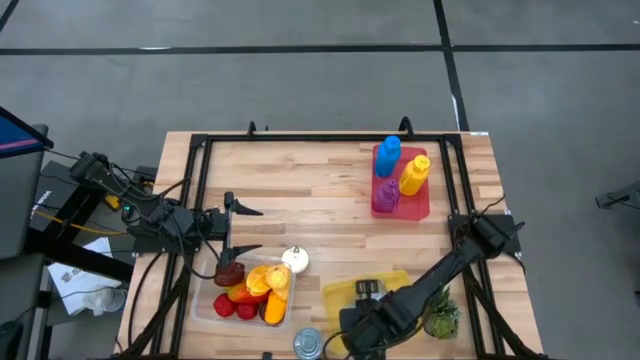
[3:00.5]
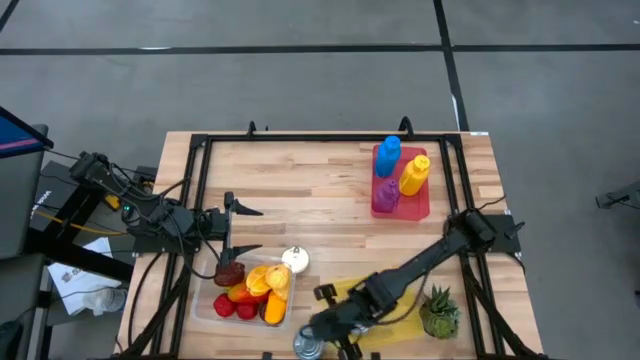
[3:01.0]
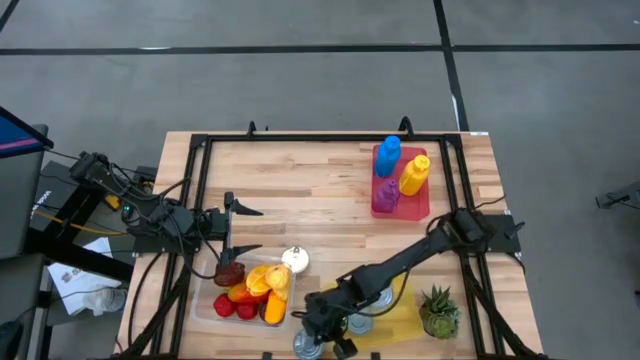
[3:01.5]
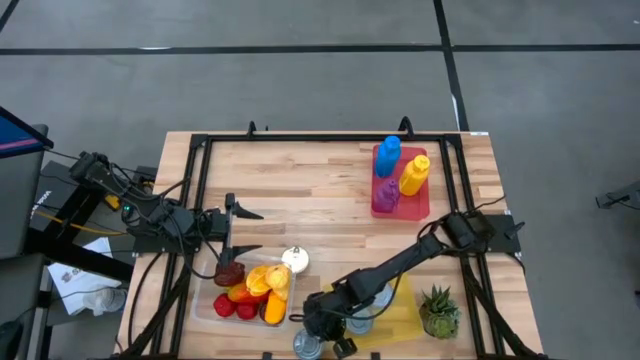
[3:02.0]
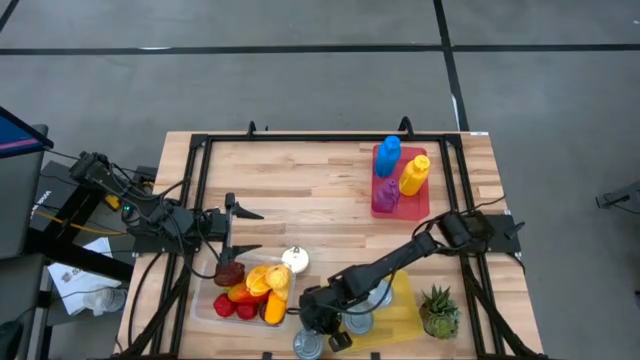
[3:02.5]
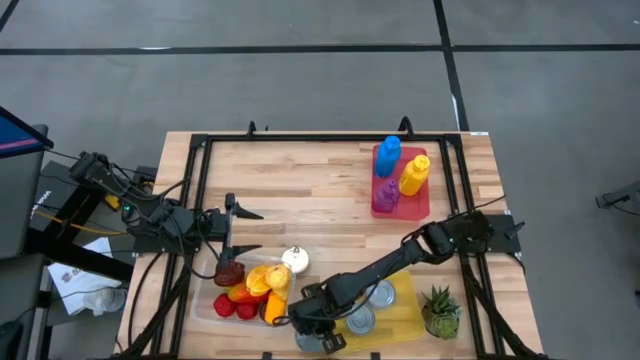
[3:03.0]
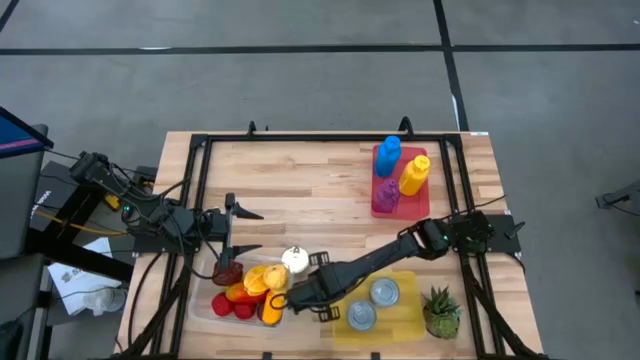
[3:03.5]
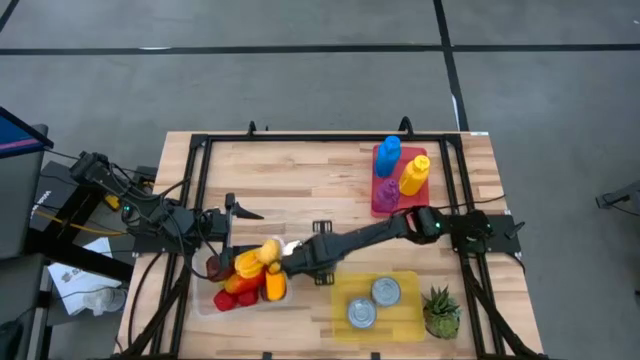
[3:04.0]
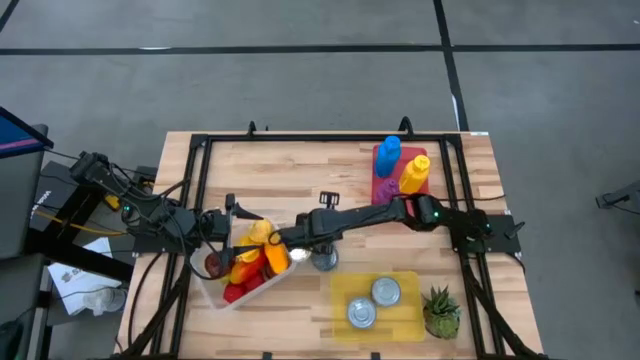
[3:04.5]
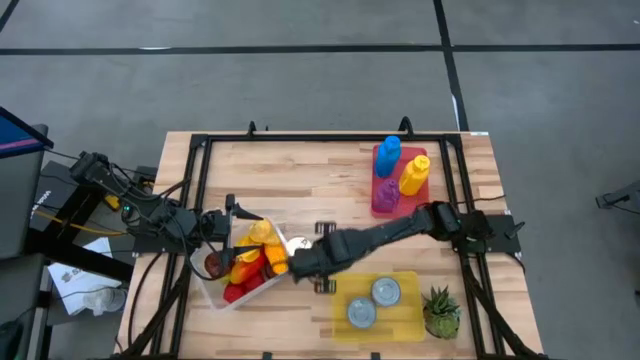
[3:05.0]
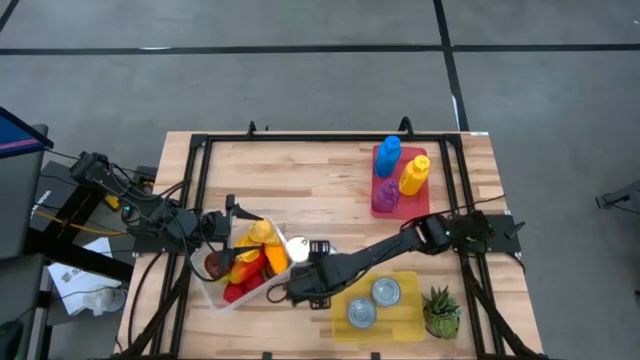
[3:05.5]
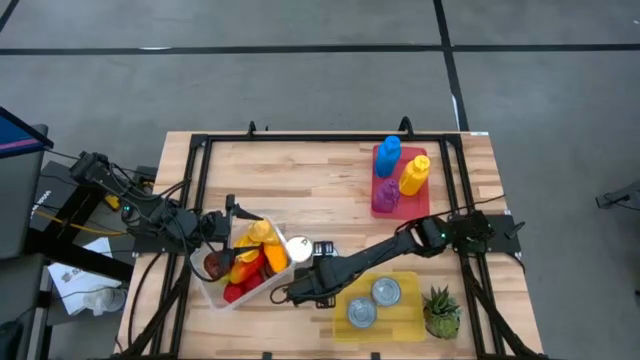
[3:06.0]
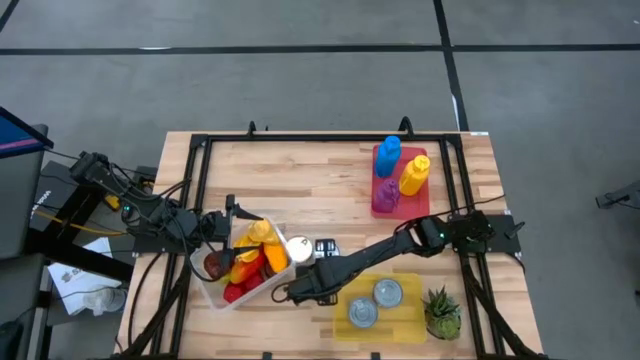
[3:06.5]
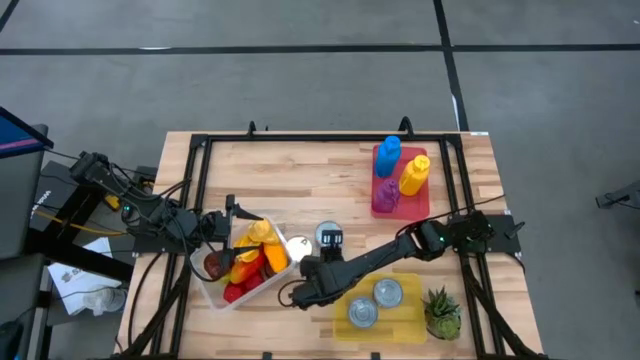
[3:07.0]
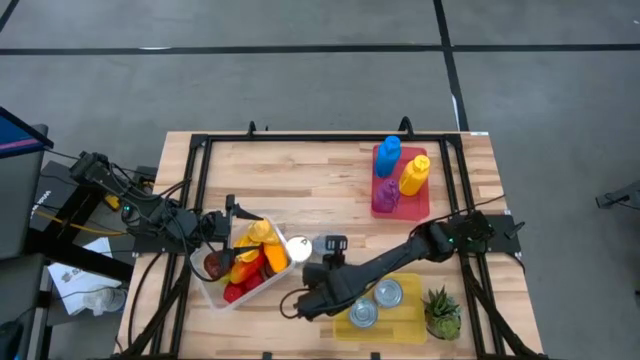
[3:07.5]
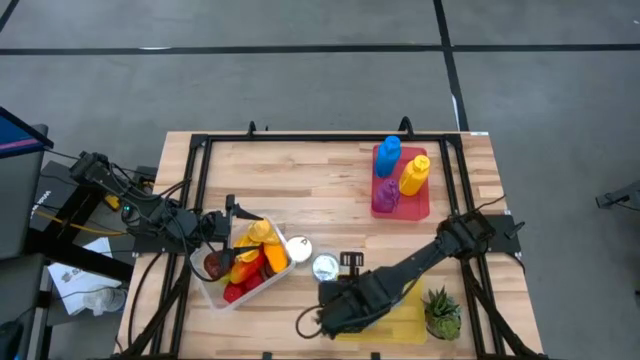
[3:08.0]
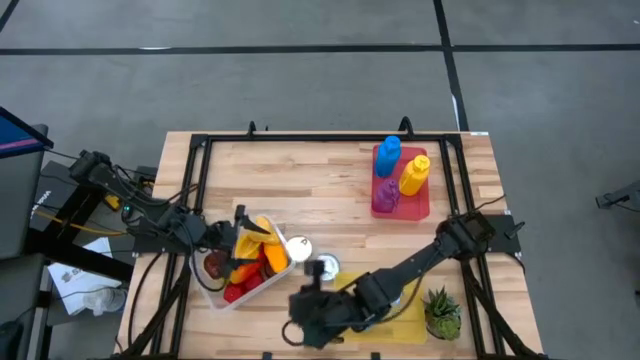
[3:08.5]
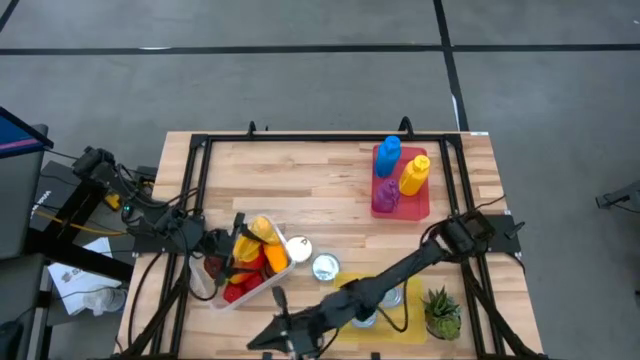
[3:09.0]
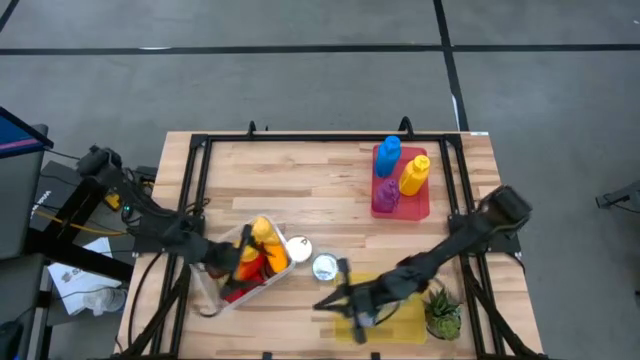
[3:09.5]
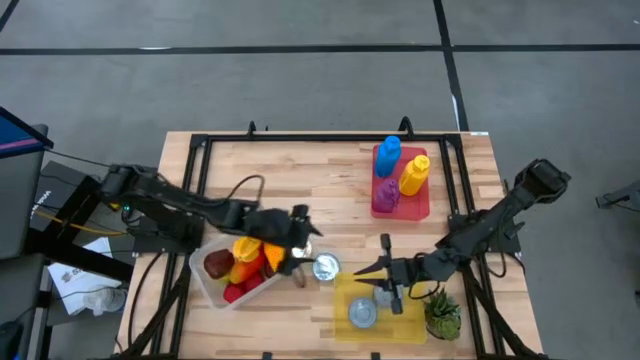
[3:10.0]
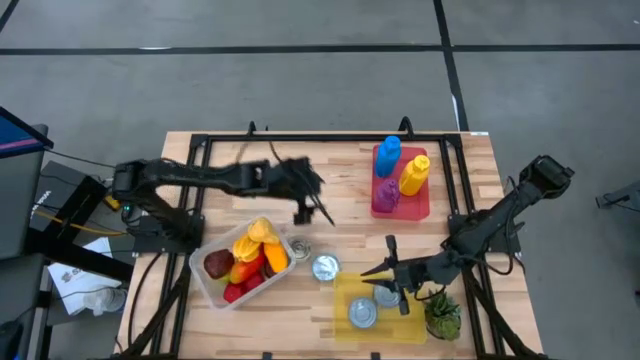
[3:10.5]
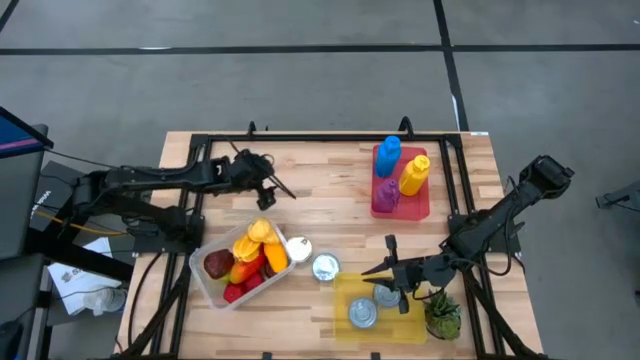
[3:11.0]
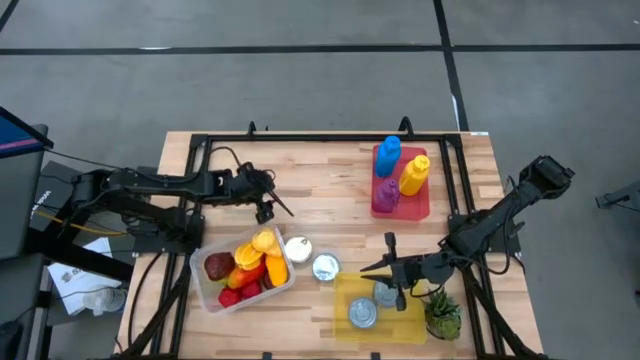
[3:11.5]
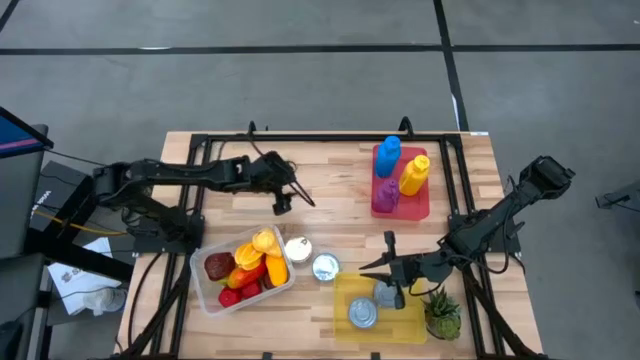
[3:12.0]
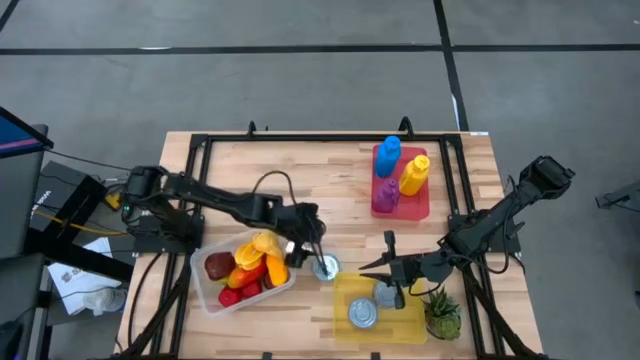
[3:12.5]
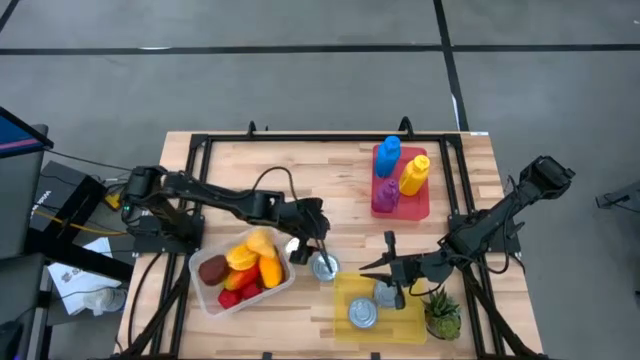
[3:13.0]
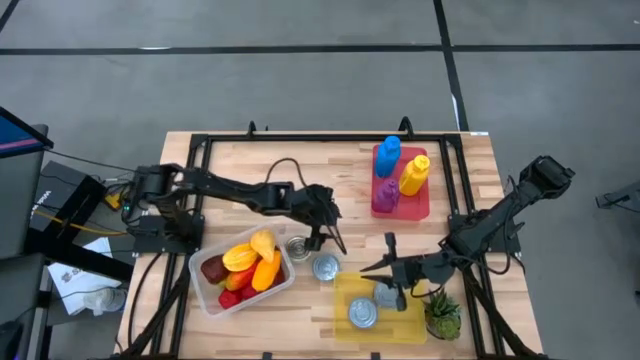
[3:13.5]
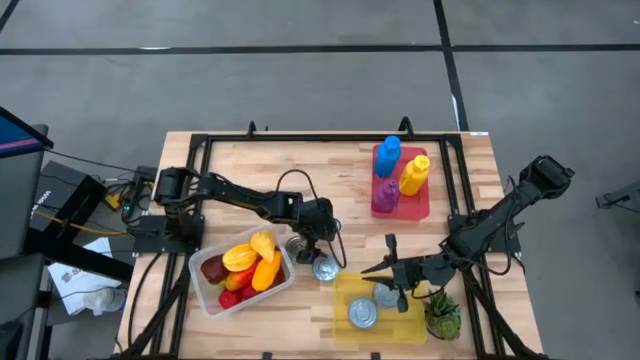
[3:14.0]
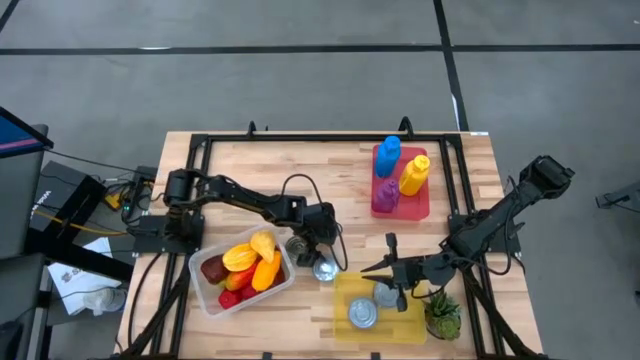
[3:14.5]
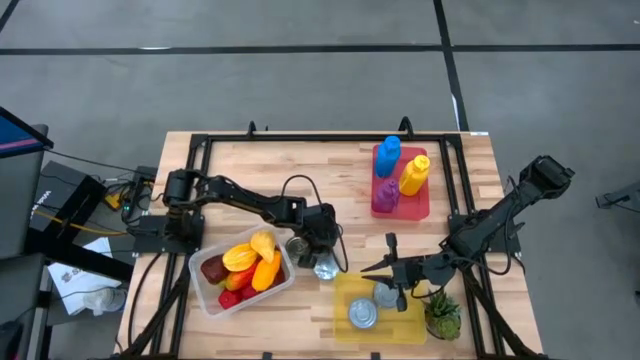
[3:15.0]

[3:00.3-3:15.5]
Task: Pick & Place Food Item
Put the green tuna can into the yellow bin

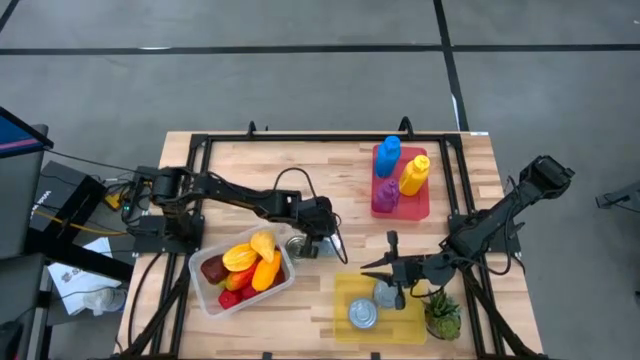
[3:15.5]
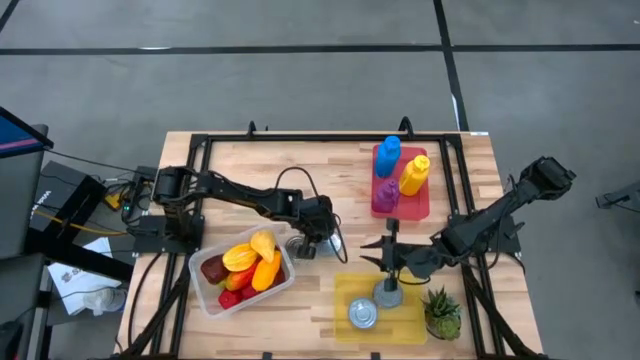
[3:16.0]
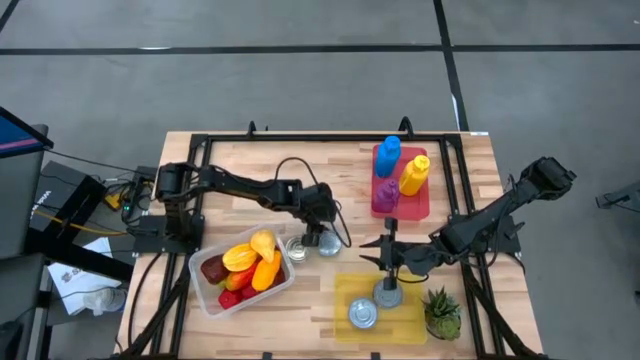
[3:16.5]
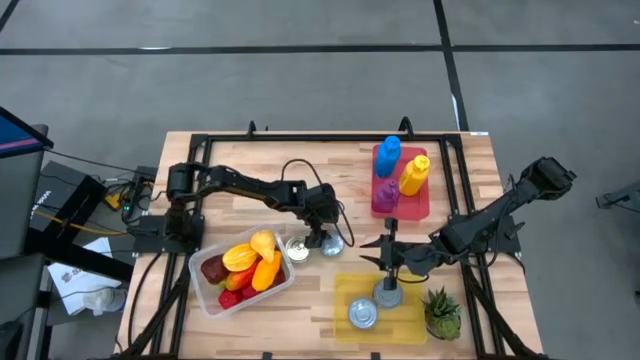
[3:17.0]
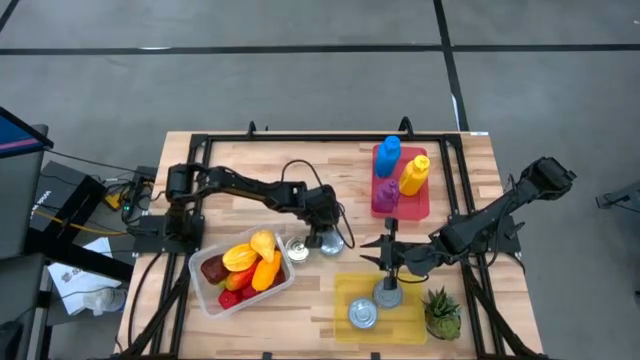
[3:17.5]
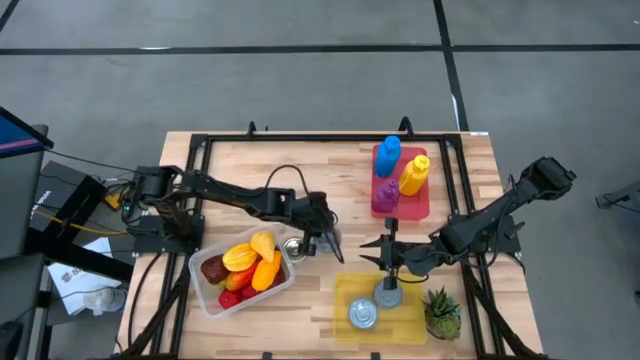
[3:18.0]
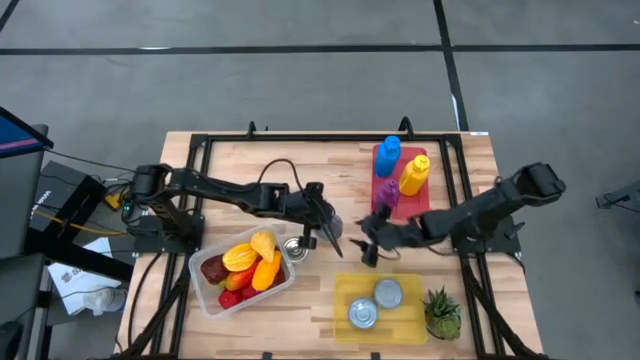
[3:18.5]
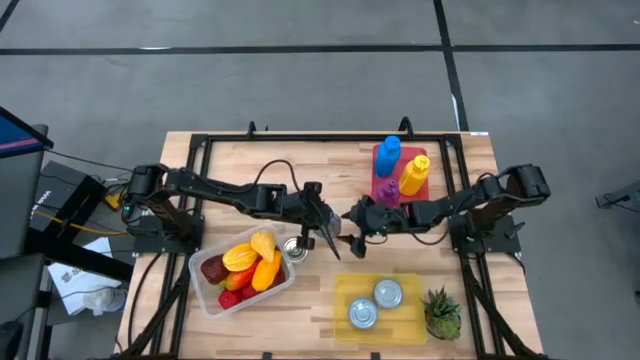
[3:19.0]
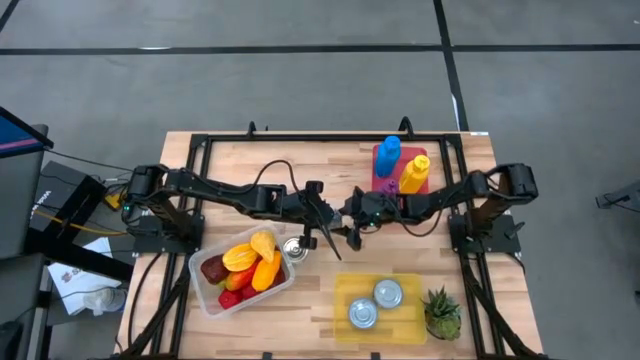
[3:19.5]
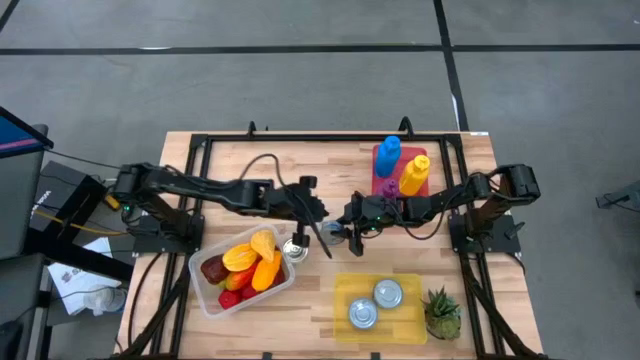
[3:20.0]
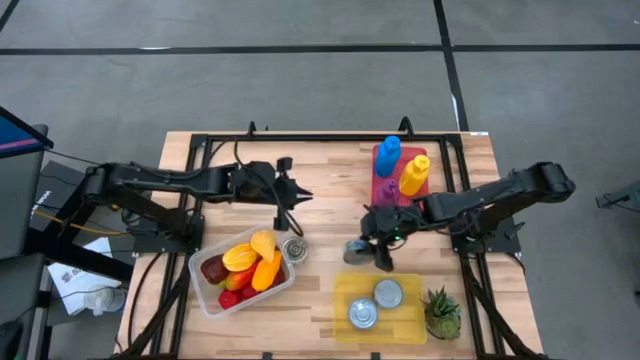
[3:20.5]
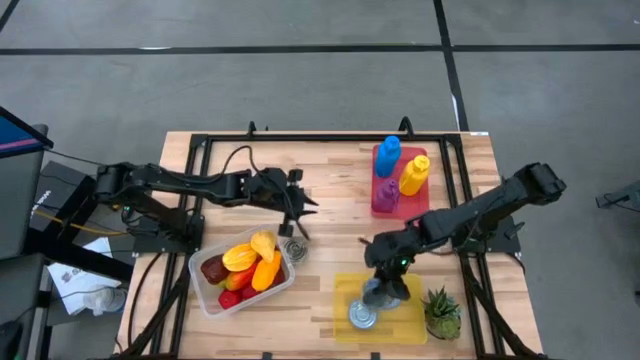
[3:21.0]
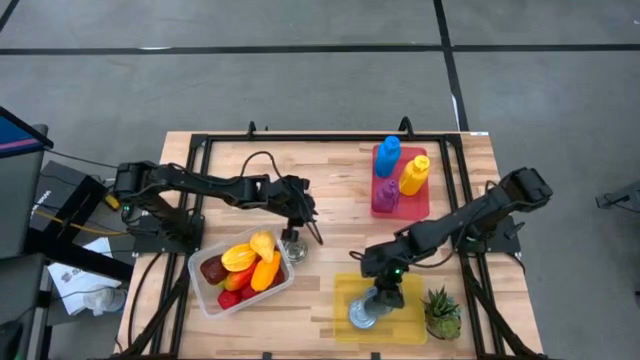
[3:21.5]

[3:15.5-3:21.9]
Put the green tuna can into the yellow bin

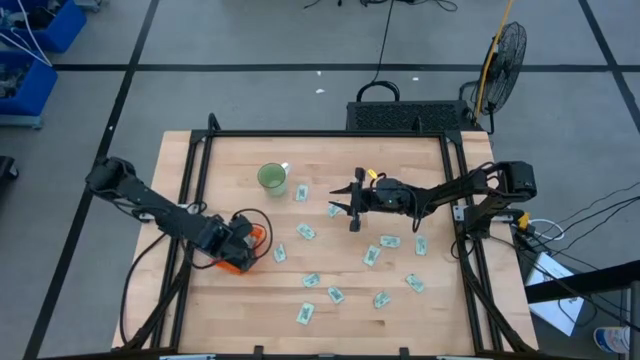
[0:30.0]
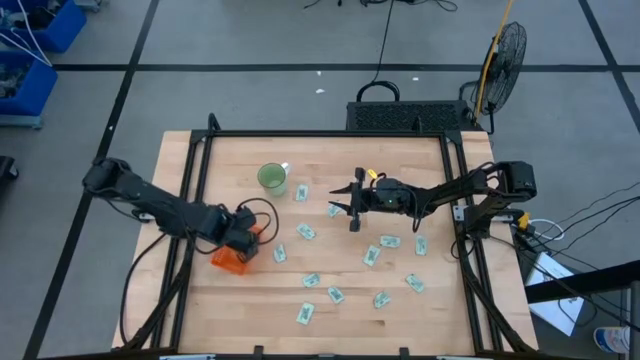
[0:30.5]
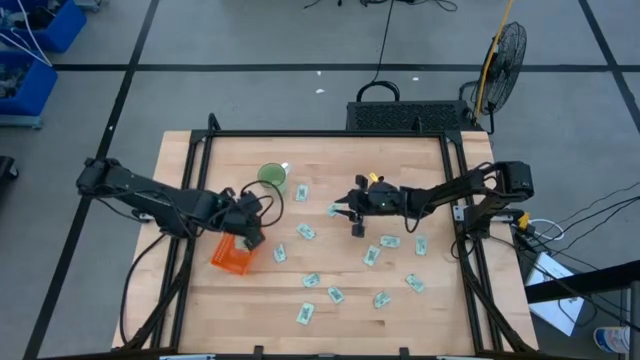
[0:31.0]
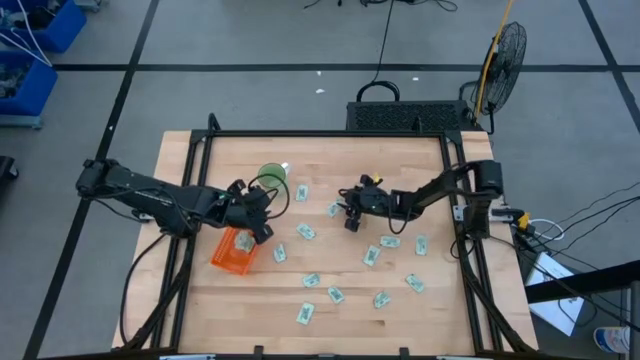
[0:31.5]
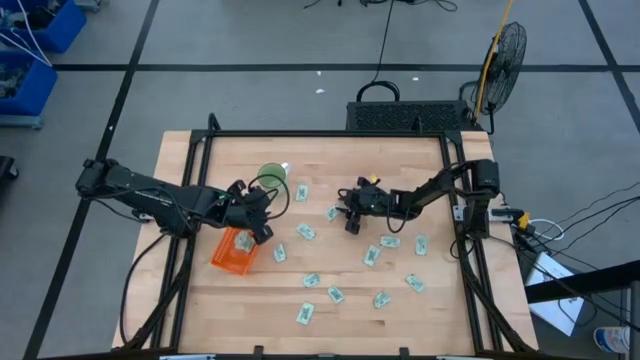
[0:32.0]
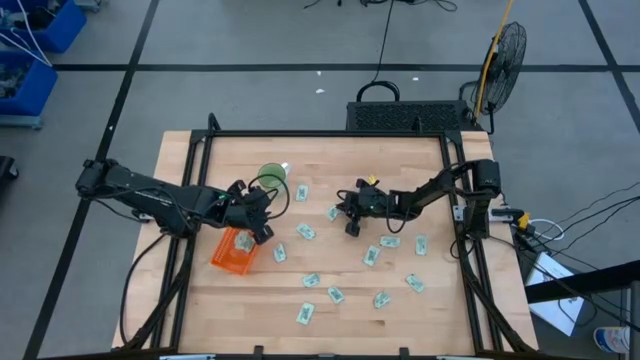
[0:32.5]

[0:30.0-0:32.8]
Task: Pick and place Stevia / Truvia into bins
Put the stevia packet into the orange bin
